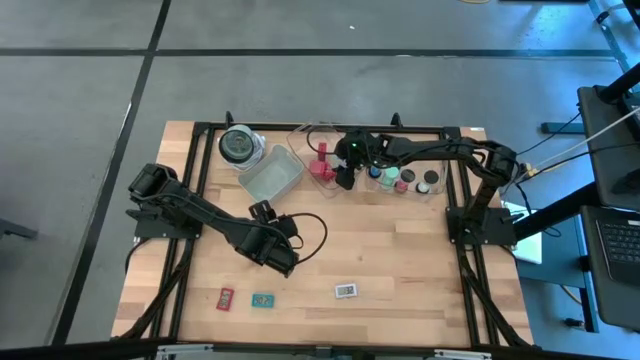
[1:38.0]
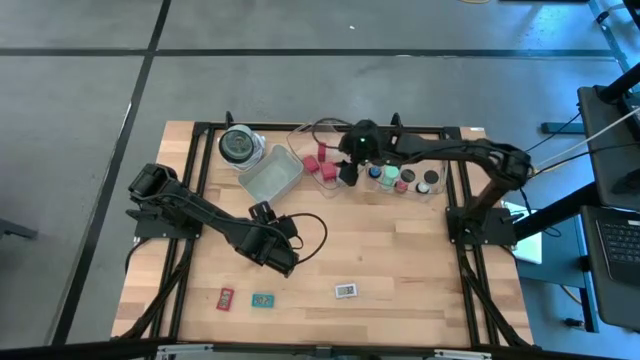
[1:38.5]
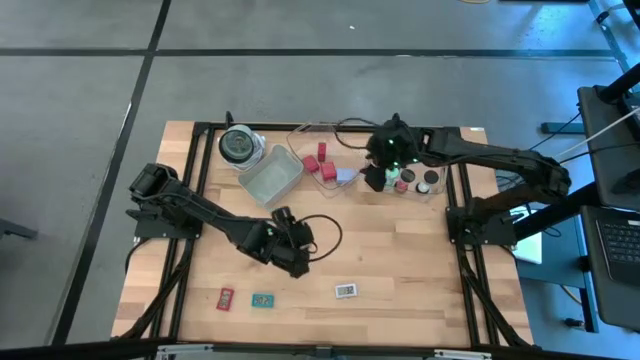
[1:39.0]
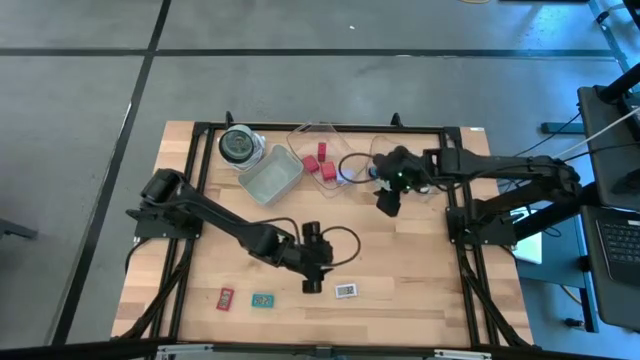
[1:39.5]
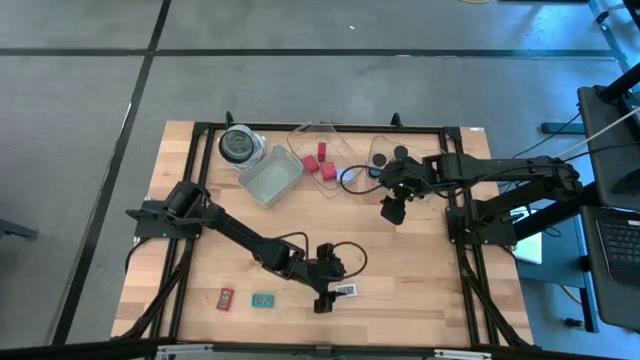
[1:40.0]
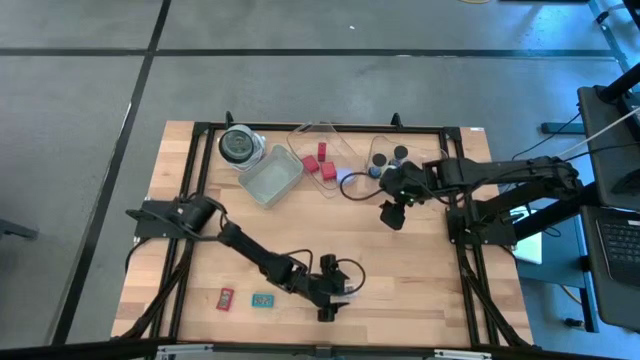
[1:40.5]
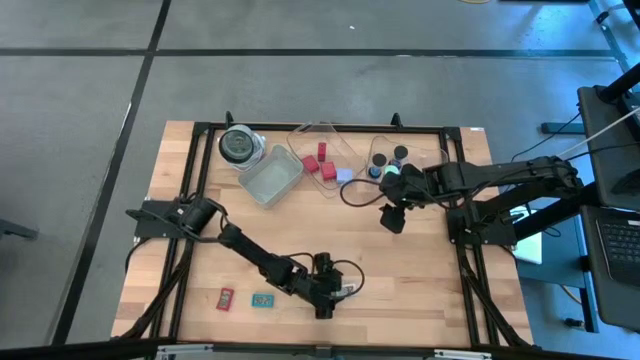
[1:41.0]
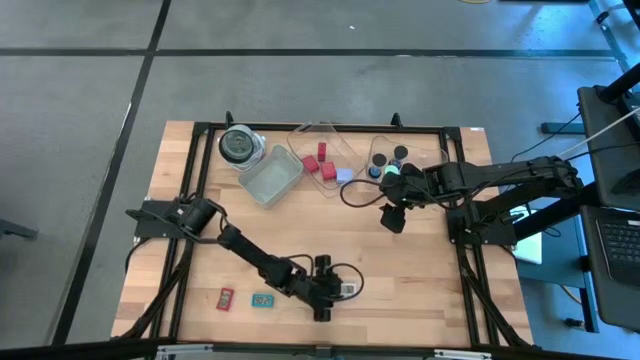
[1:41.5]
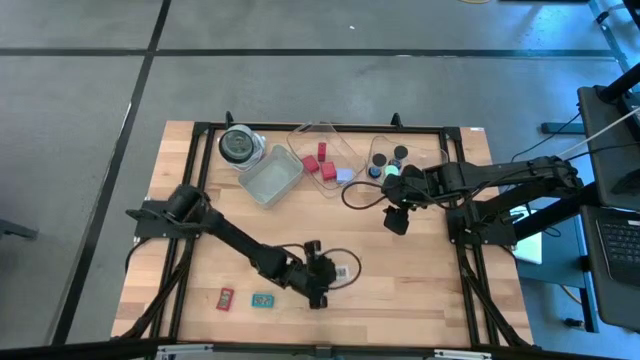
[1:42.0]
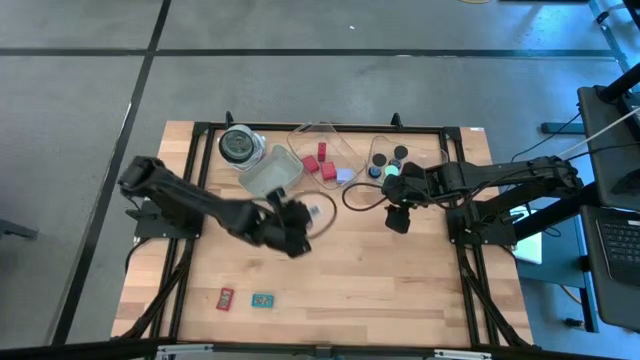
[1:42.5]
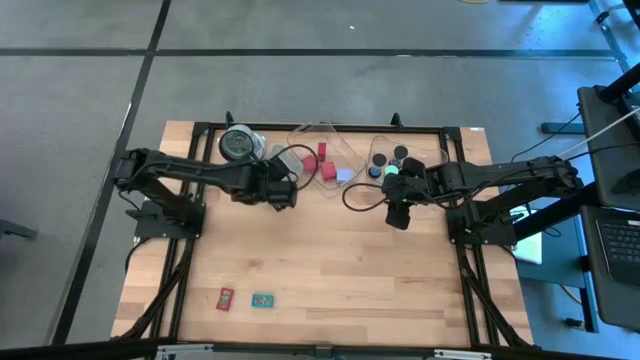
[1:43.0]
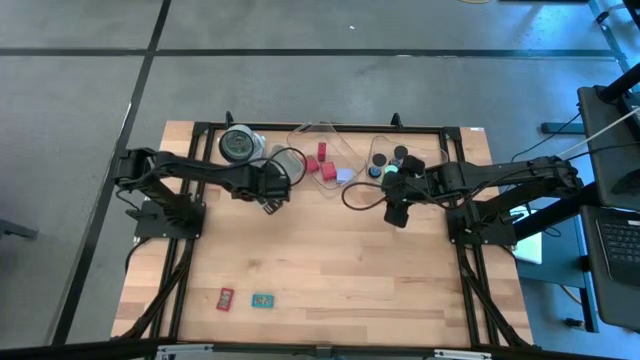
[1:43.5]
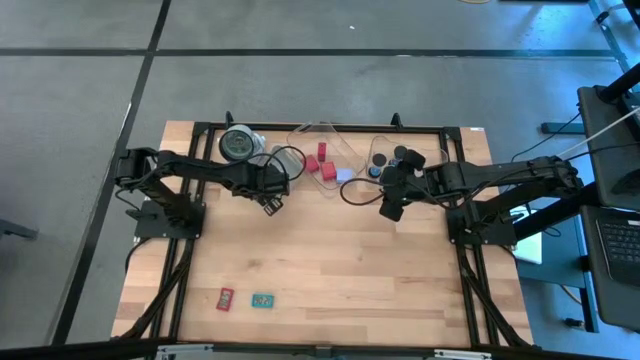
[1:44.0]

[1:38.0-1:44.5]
Task: Pick & Place Office items
Put the white digital clock into the gray bin

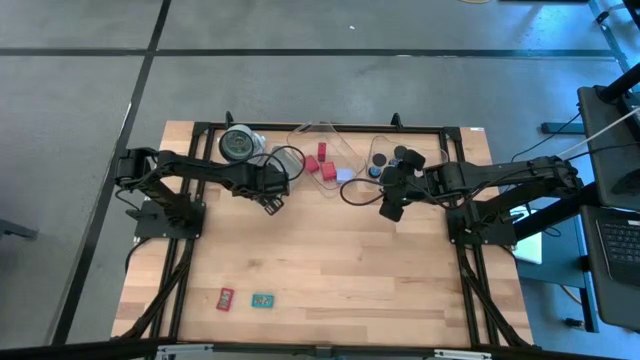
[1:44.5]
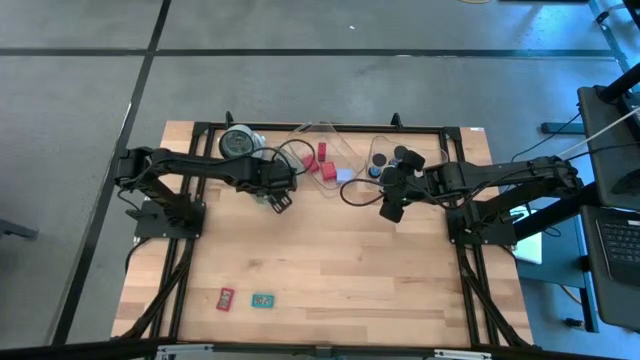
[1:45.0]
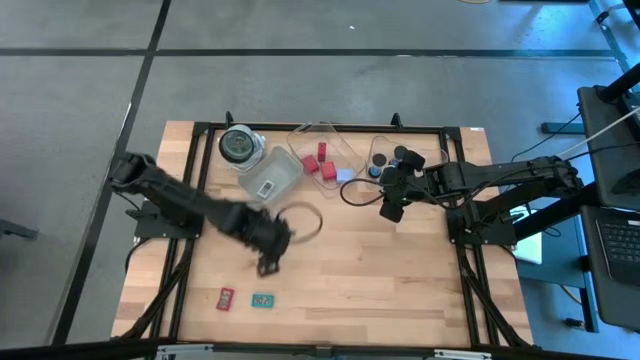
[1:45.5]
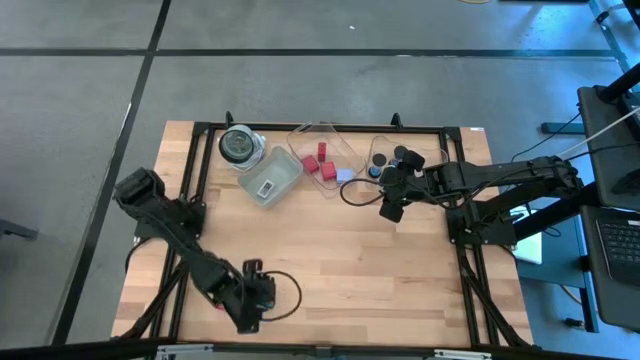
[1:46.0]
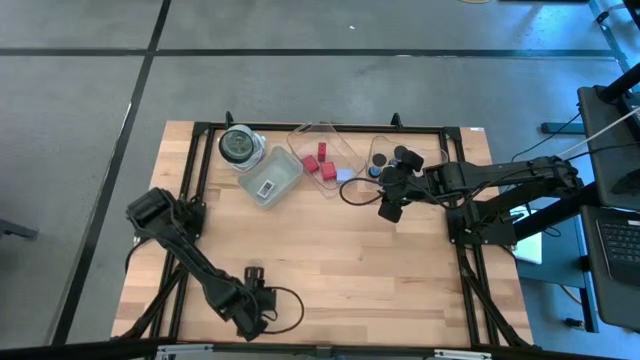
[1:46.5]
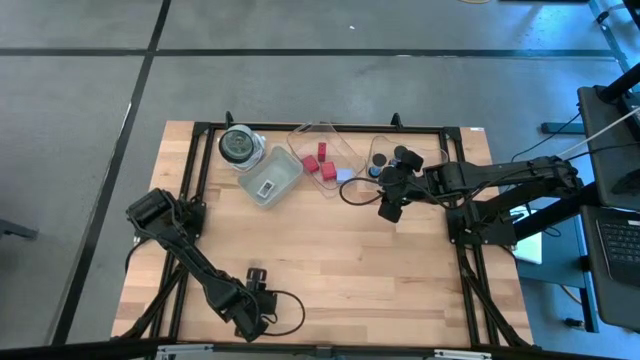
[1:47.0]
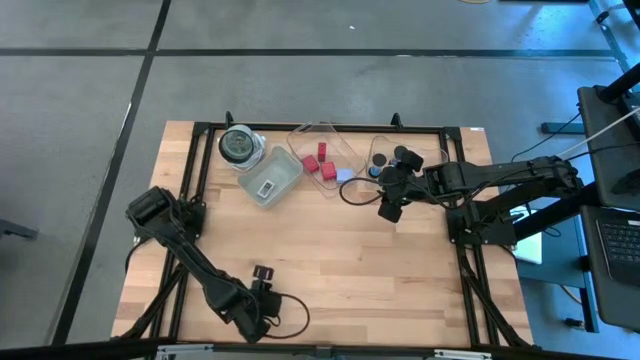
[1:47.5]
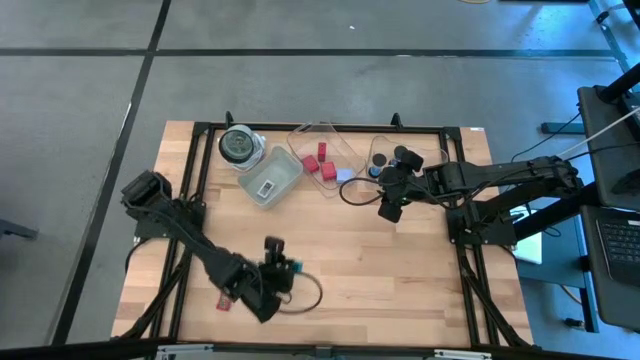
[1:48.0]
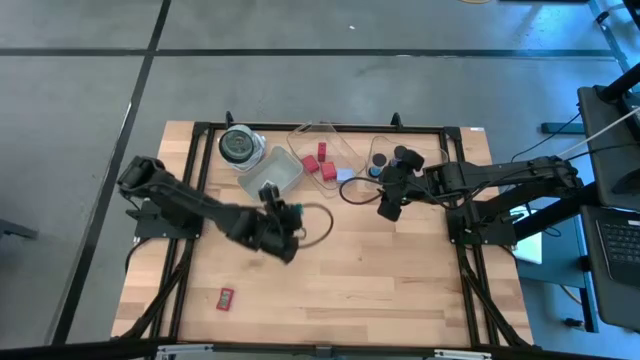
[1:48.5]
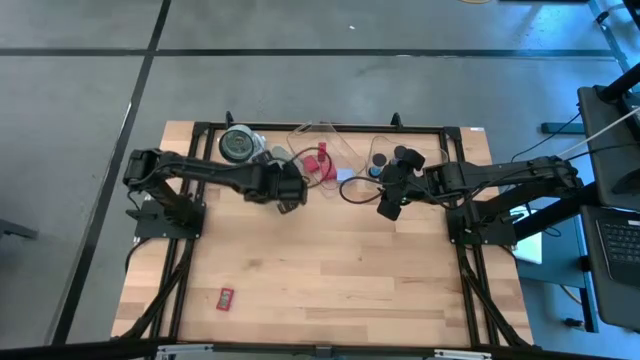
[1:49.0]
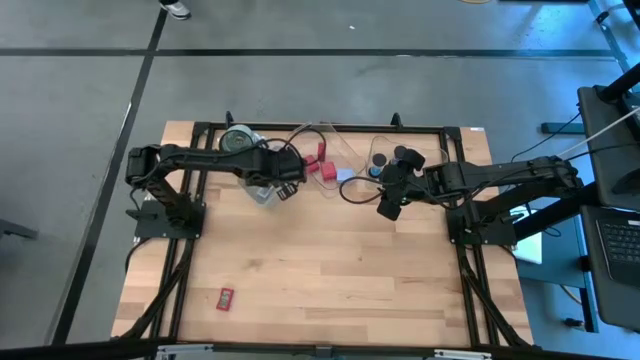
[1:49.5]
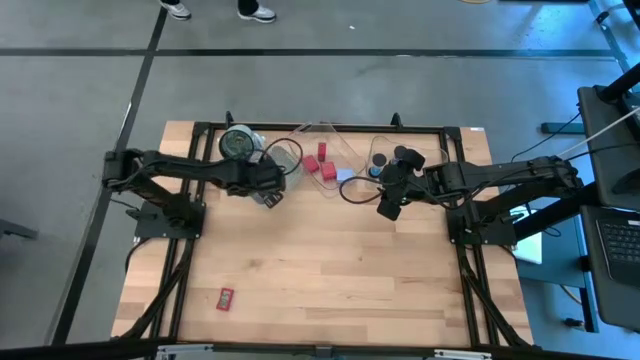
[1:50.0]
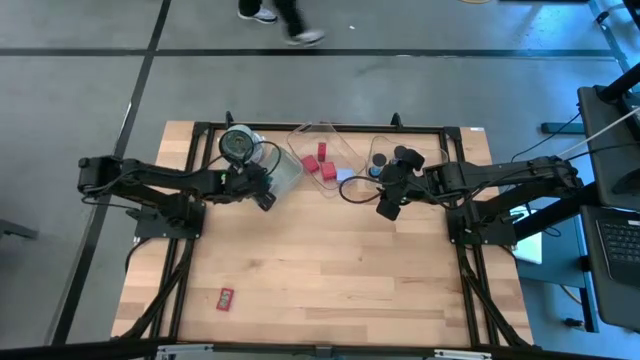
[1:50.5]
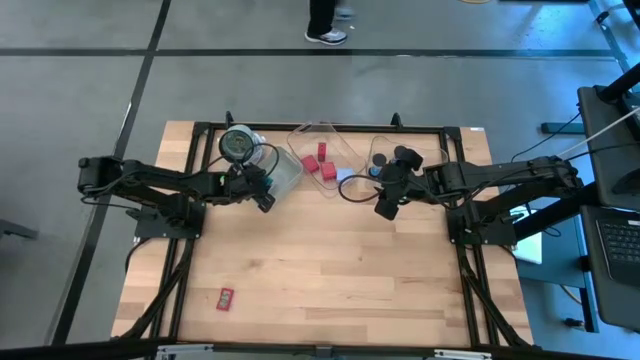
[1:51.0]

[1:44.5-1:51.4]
Put the blue digital clock into the gray bin

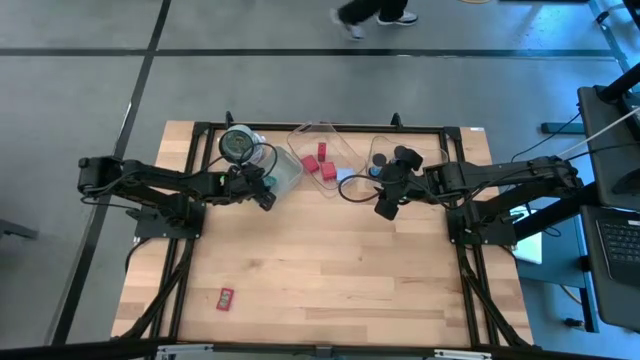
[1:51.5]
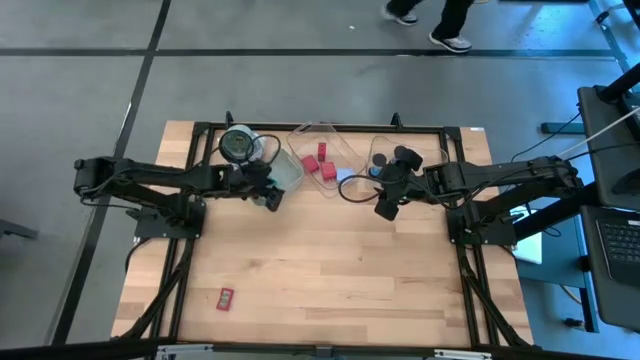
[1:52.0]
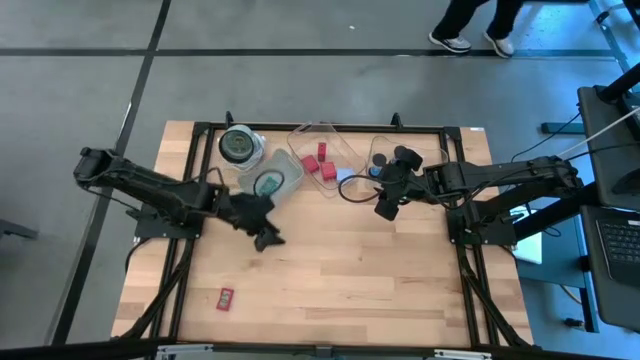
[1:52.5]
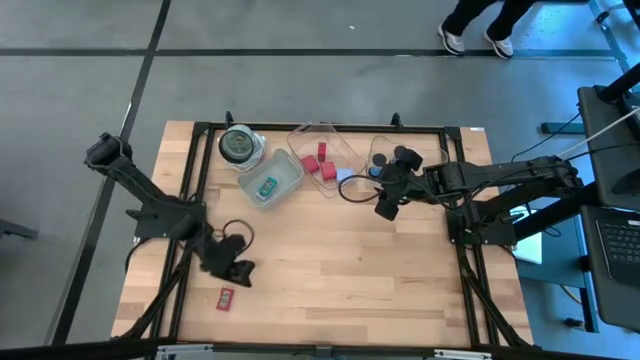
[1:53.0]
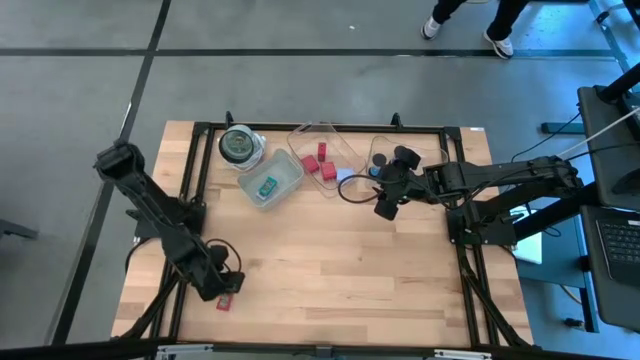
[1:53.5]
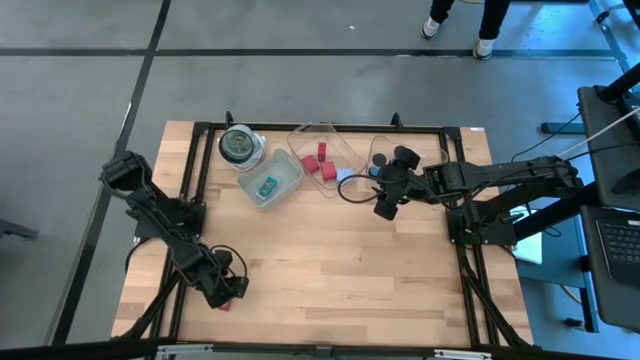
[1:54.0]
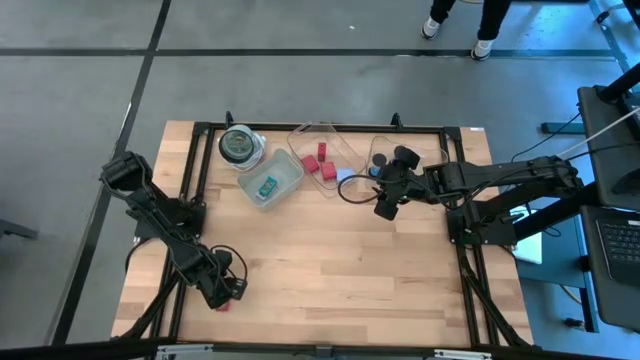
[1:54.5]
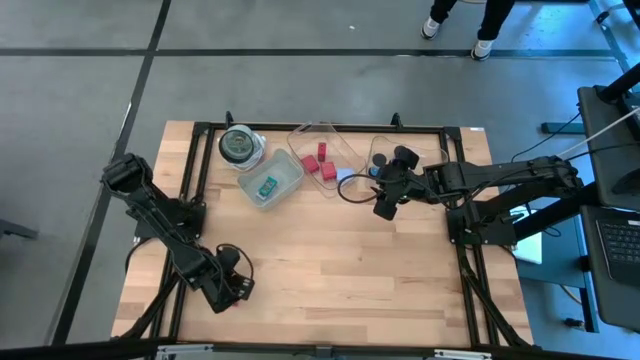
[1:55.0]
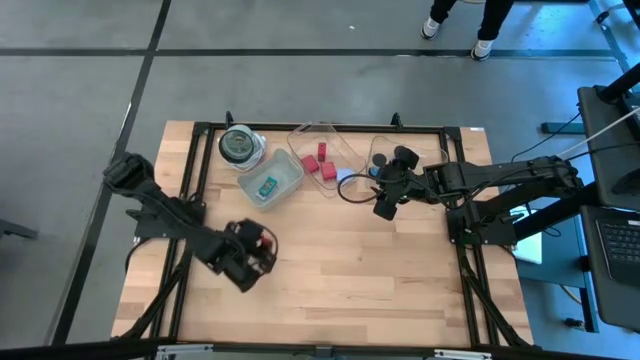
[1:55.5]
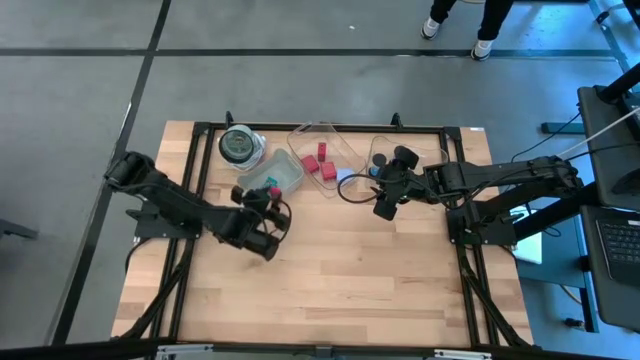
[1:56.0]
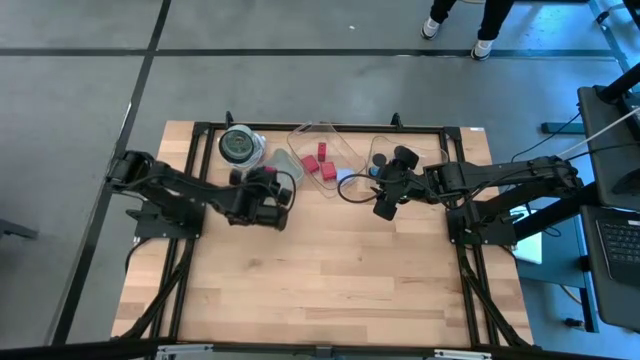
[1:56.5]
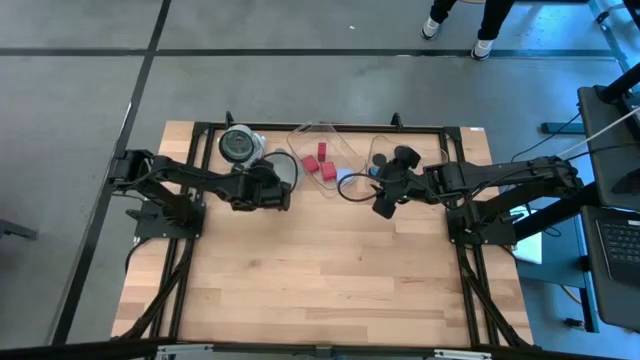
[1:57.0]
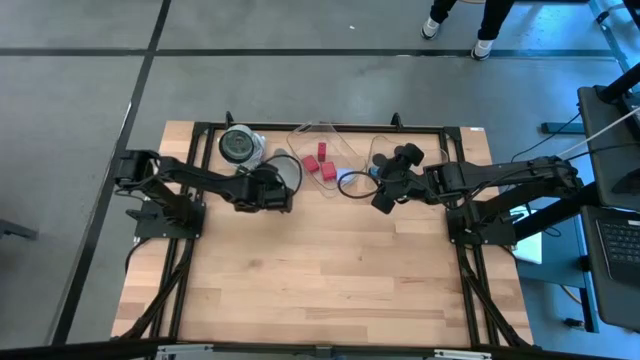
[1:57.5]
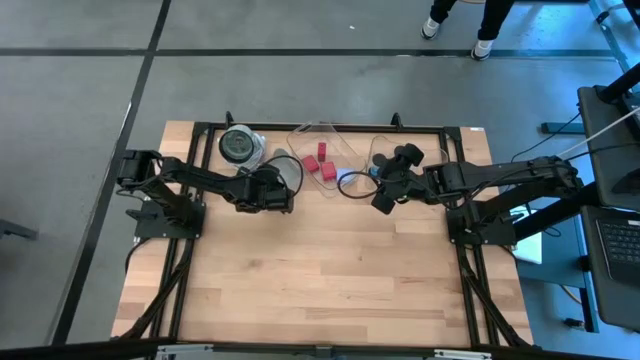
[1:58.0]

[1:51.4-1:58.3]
Put the red digital clock into the gray bin
